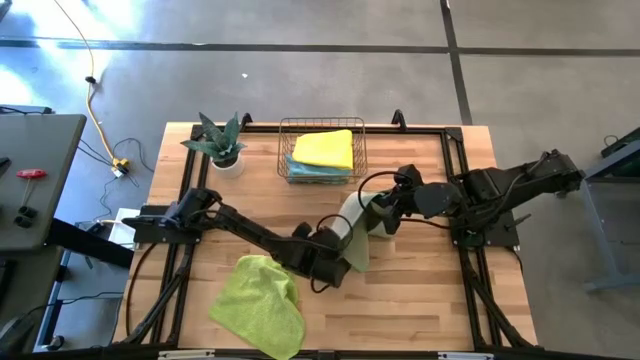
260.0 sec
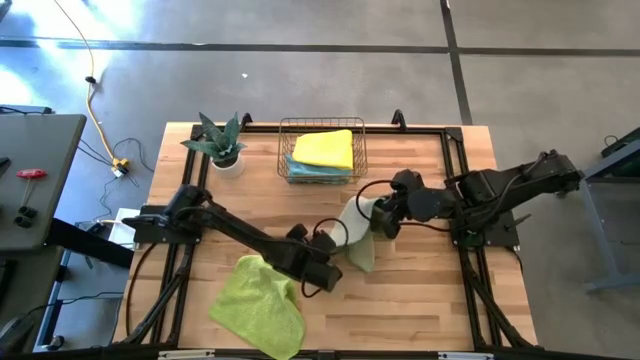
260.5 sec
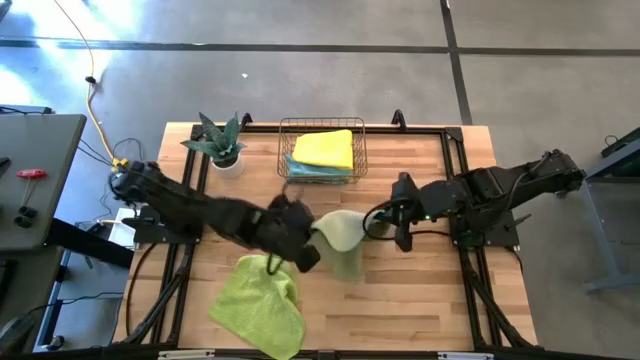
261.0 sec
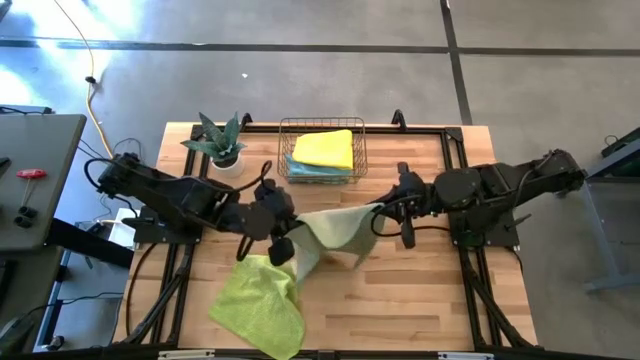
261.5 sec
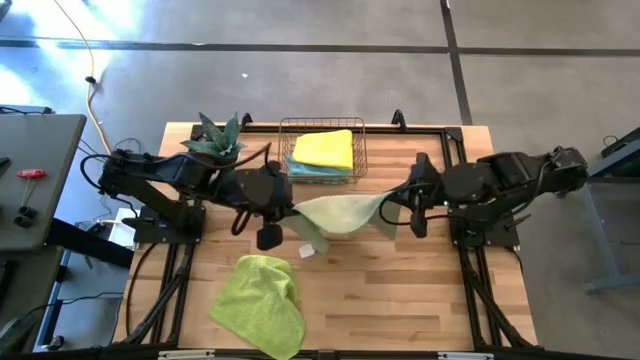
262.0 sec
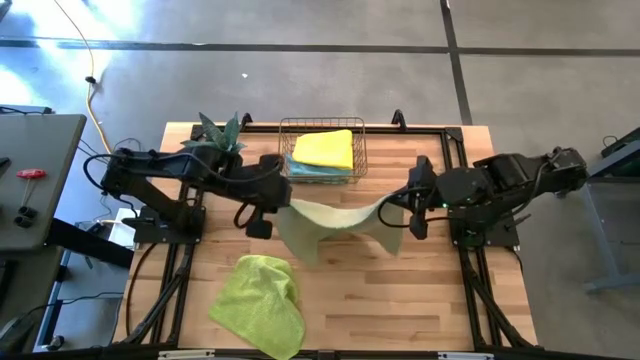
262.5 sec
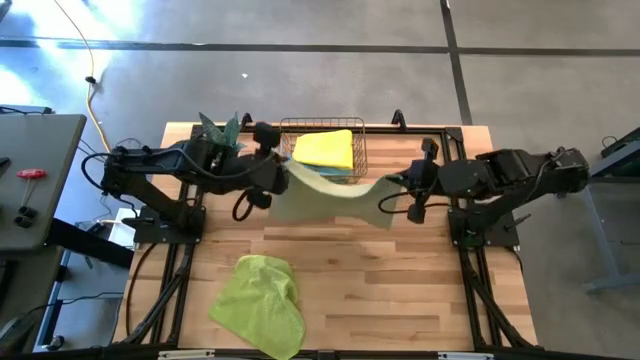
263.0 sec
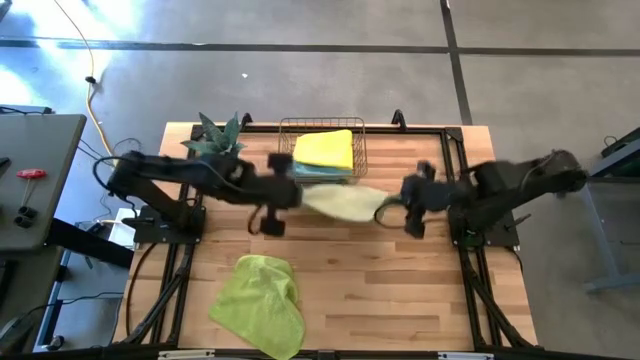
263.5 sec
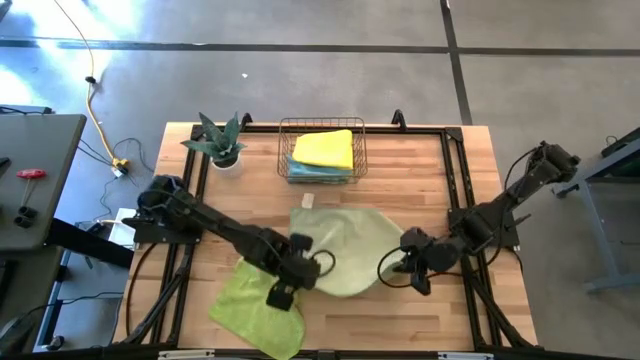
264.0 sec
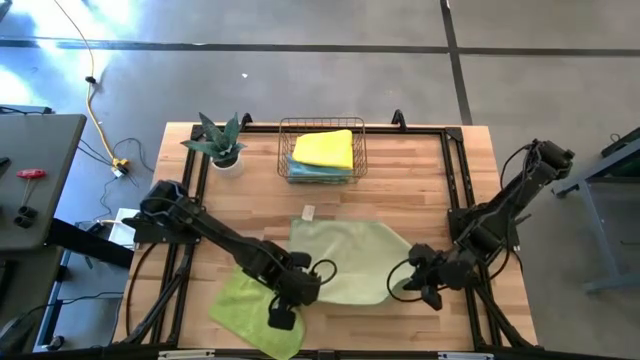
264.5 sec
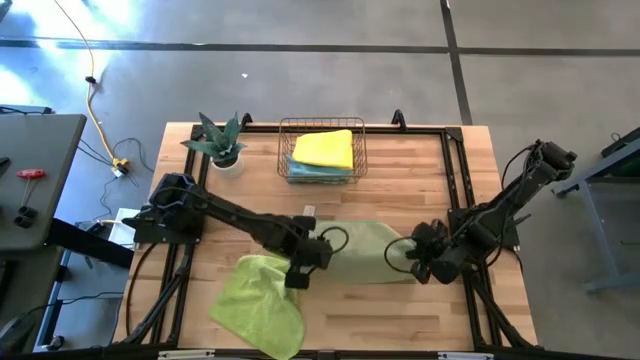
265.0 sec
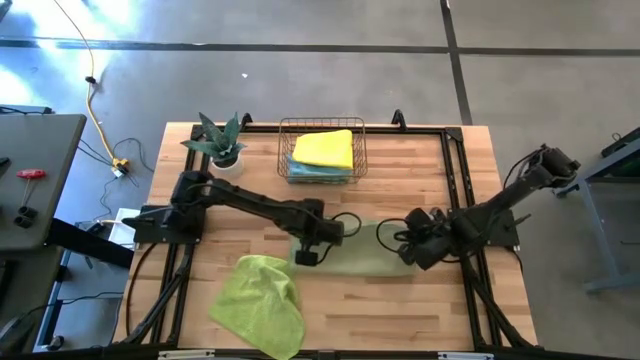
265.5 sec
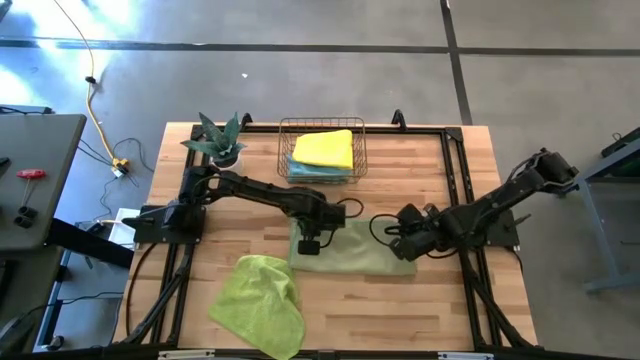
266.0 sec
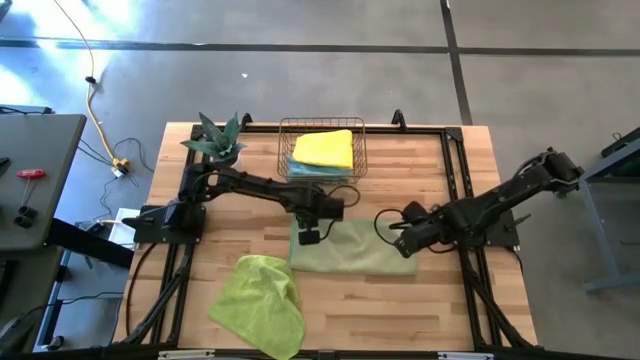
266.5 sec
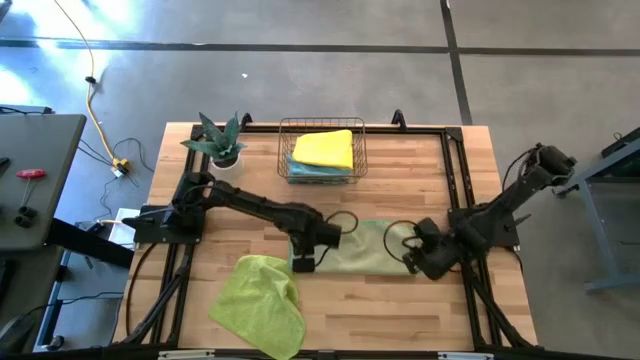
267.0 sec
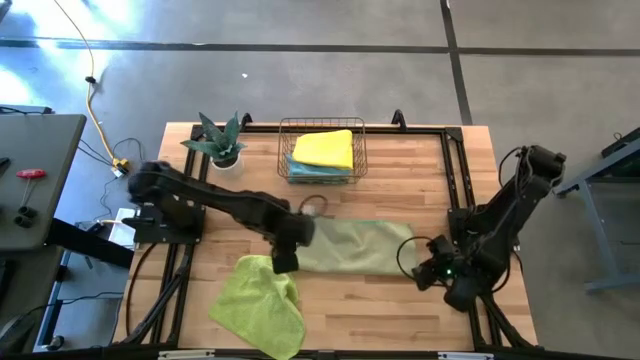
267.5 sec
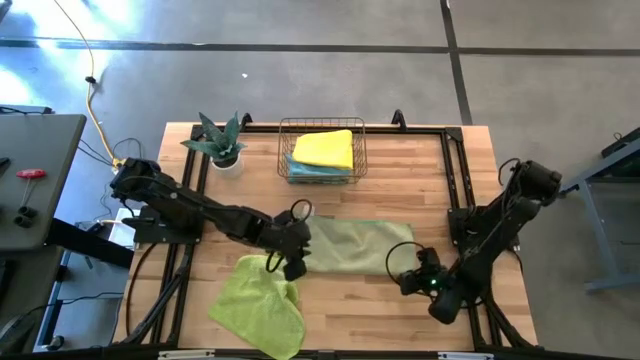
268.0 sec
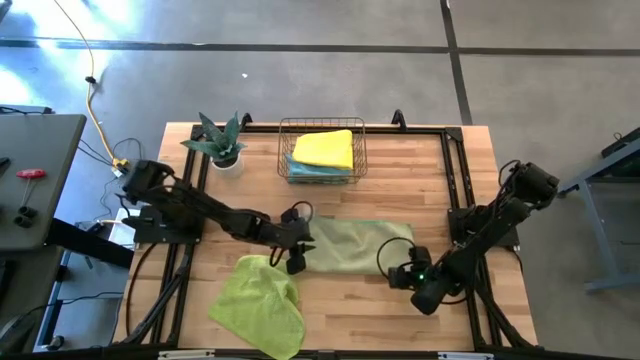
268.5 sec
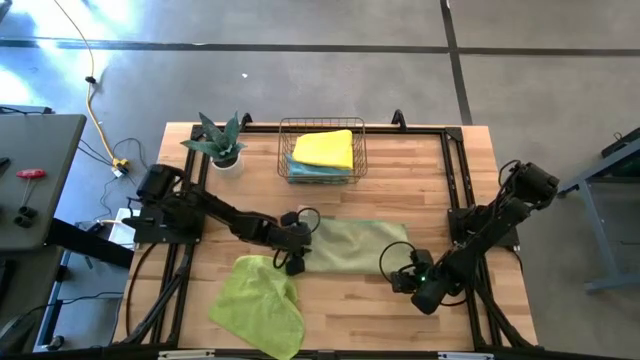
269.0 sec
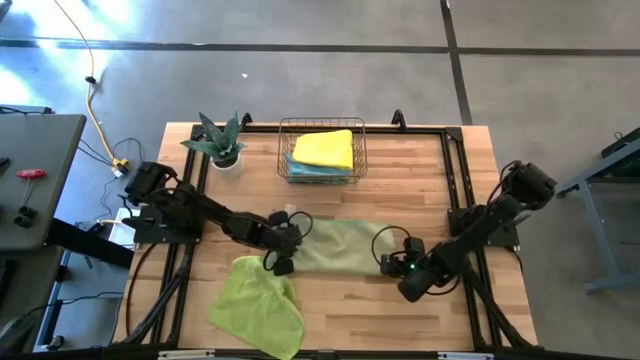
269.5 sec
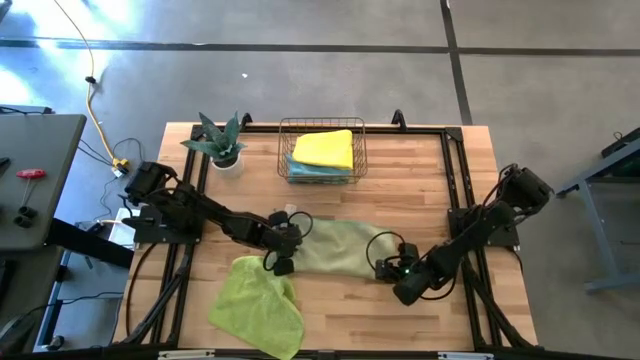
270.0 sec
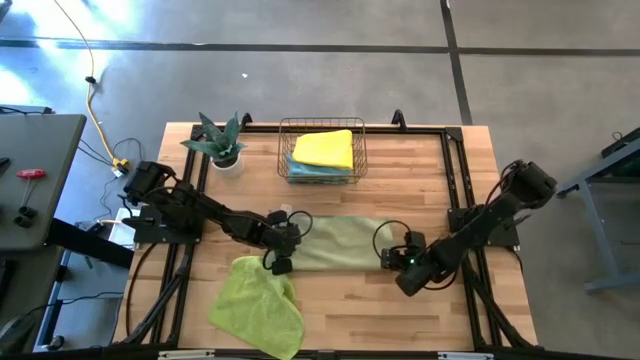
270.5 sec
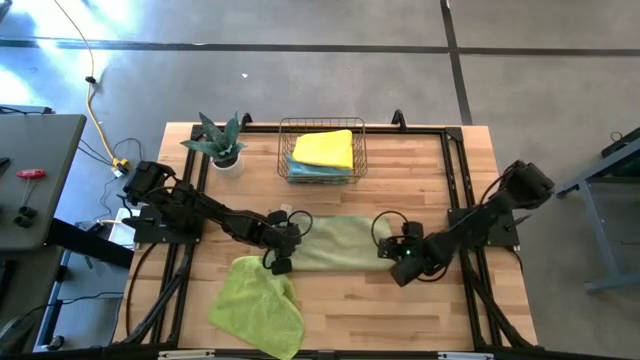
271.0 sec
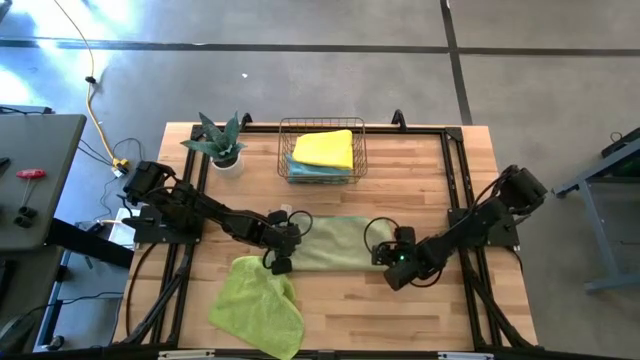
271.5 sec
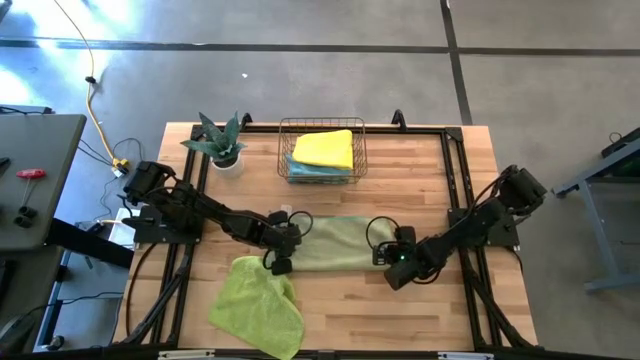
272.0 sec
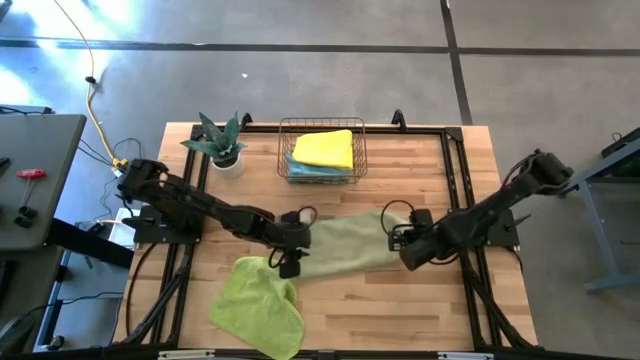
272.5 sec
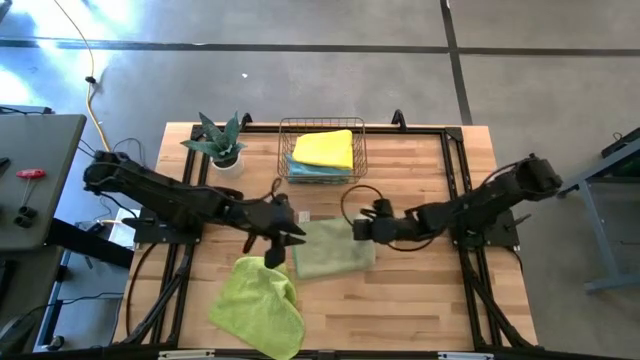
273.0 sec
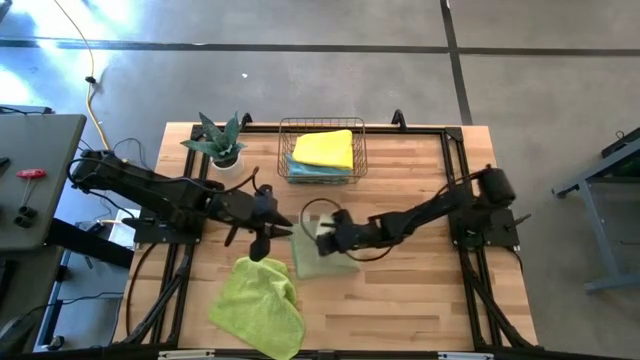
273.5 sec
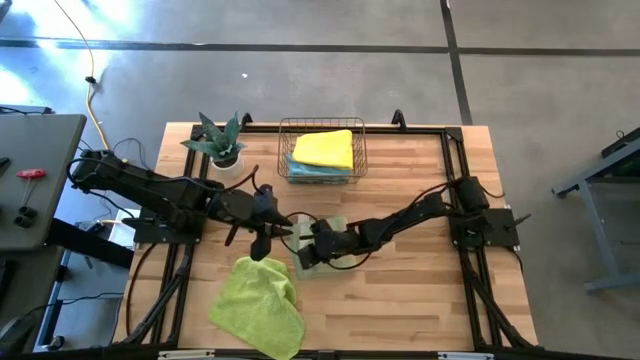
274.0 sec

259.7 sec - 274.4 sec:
Task: Fold microfiber towels
Fold the light blue microfiber cloth

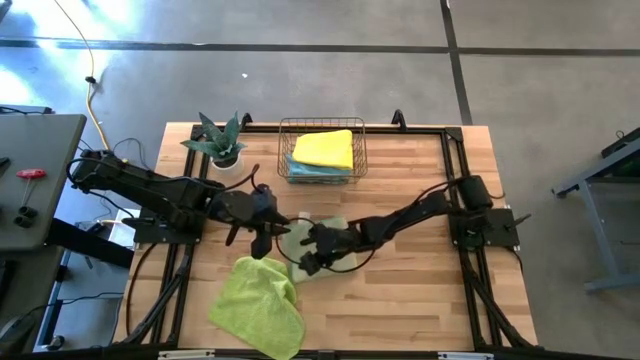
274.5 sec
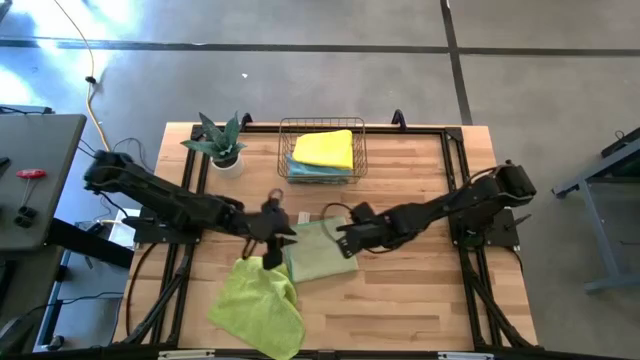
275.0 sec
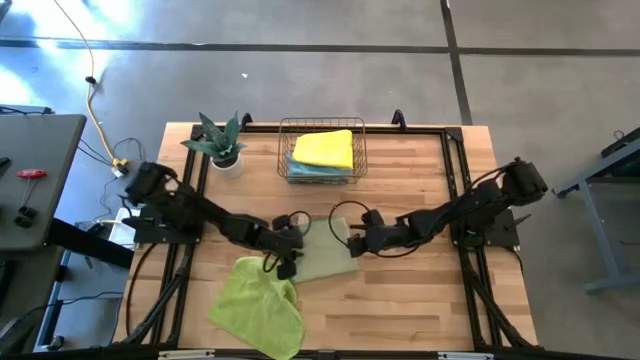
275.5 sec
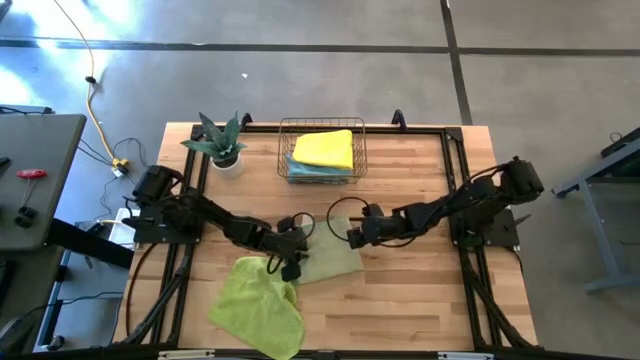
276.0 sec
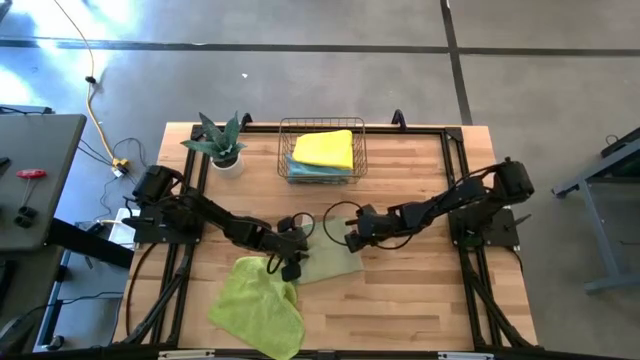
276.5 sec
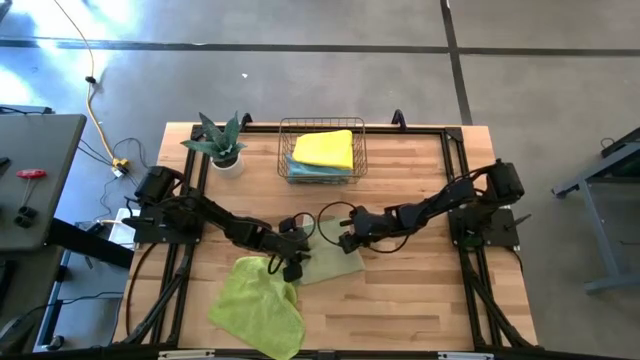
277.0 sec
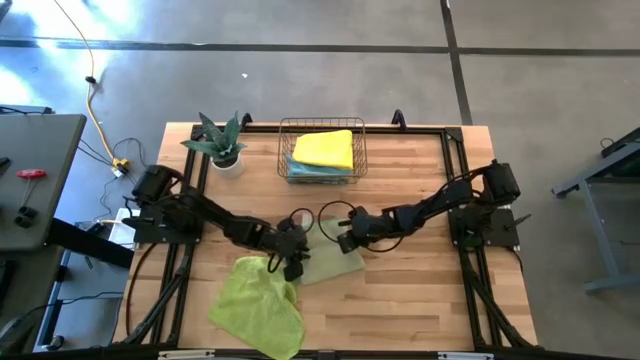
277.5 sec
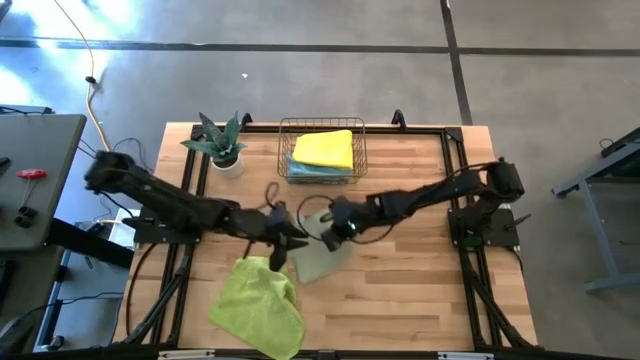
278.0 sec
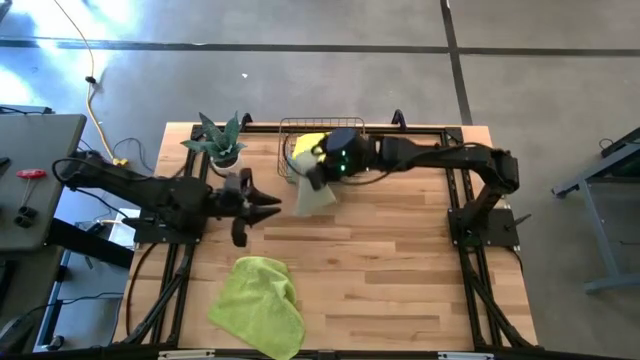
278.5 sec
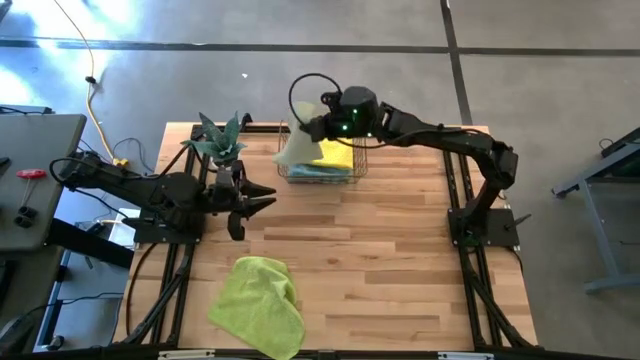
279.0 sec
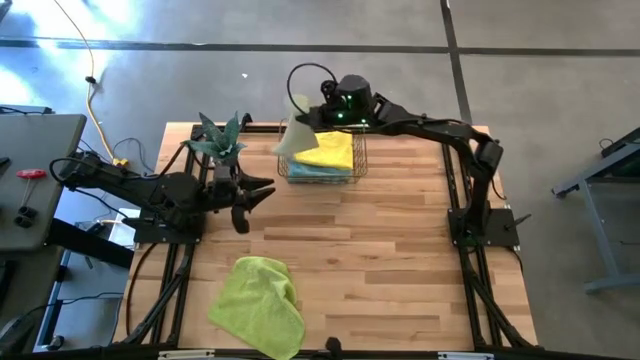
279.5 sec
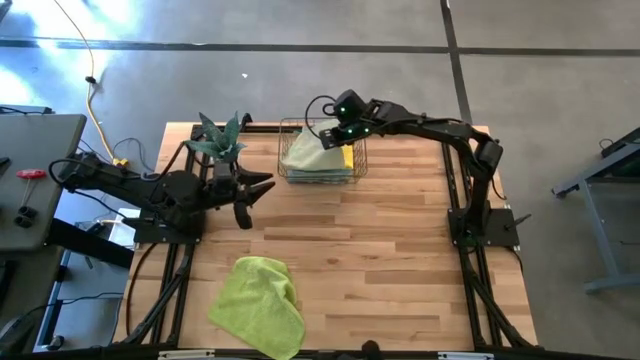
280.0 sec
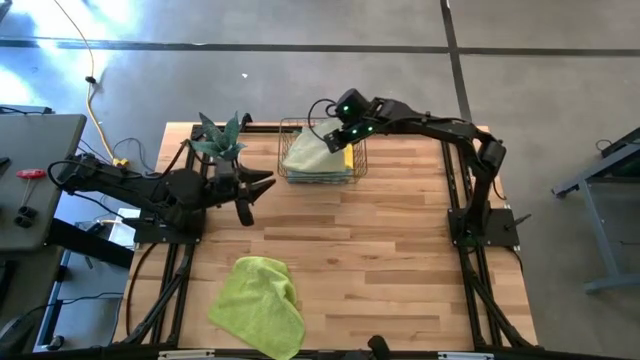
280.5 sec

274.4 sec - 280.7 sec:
Put the light blue microfiber cloth in the basket

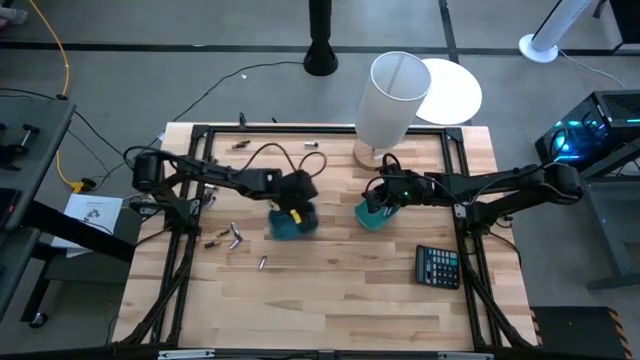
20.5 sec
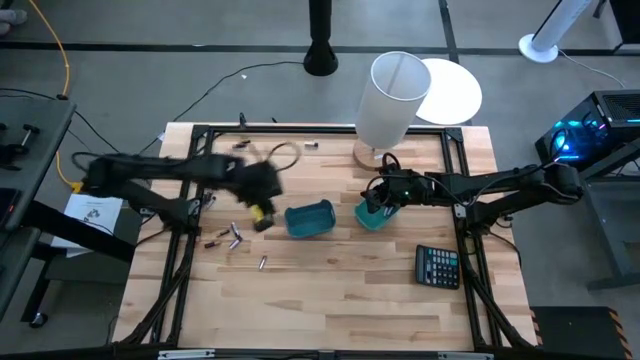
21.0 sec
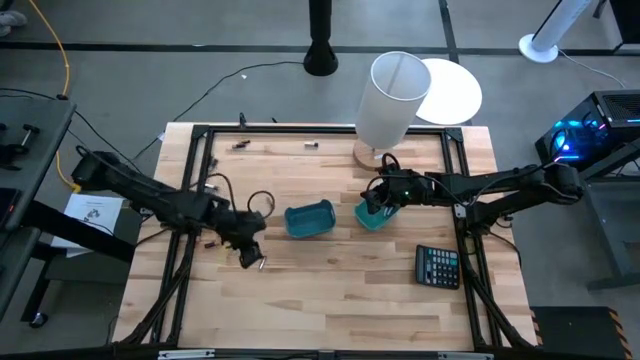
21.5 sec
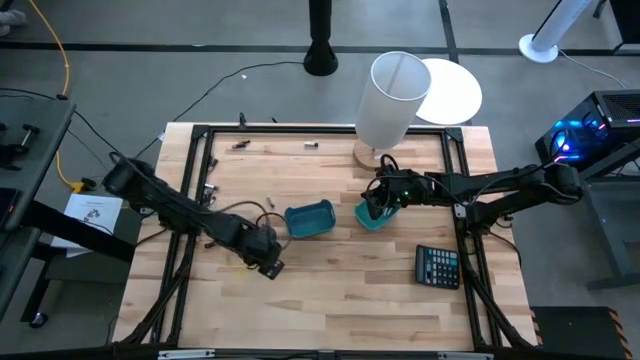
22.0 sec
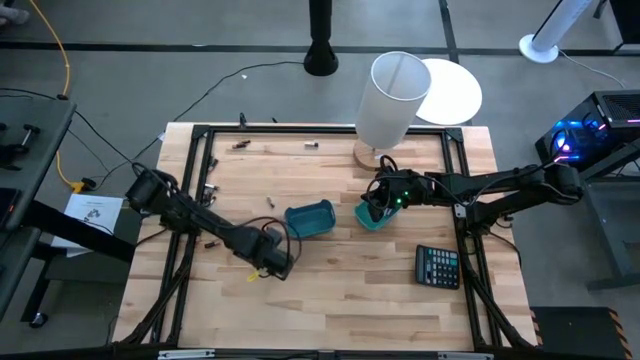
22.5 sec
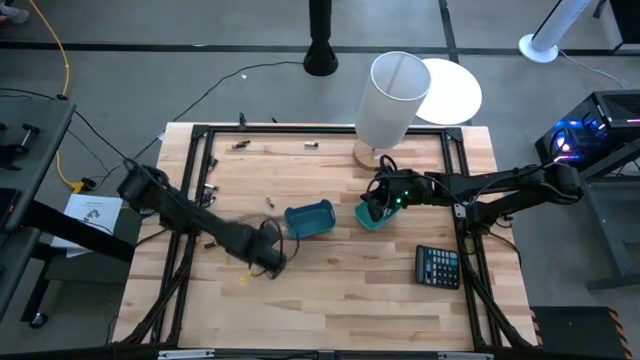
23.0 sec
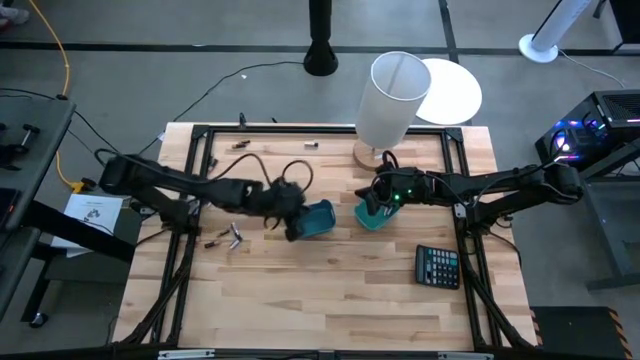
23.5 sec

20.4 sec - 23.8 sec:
Task: Sort batteries
Put the silver battery into the green bin
